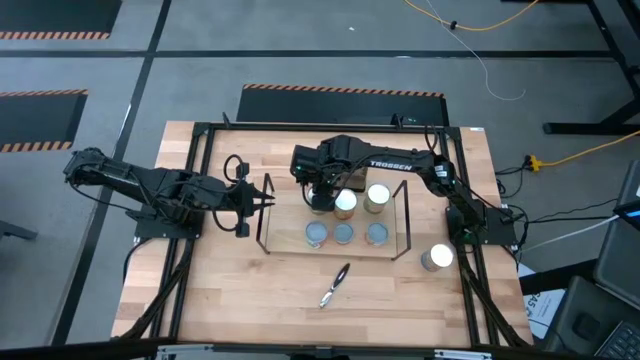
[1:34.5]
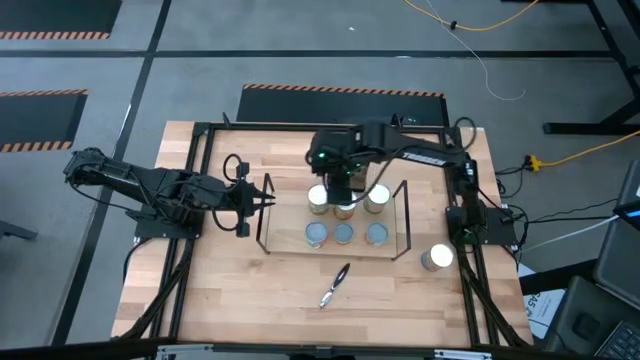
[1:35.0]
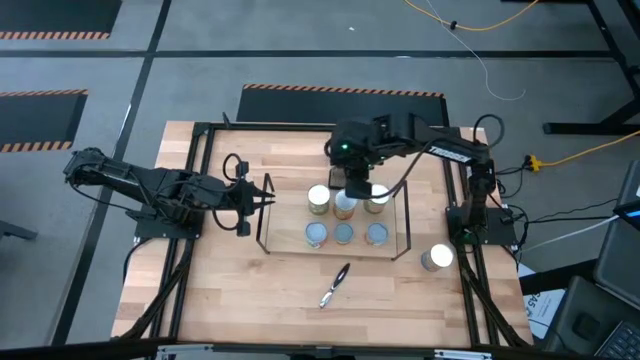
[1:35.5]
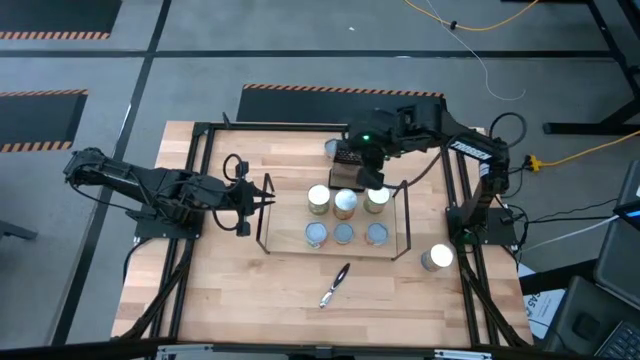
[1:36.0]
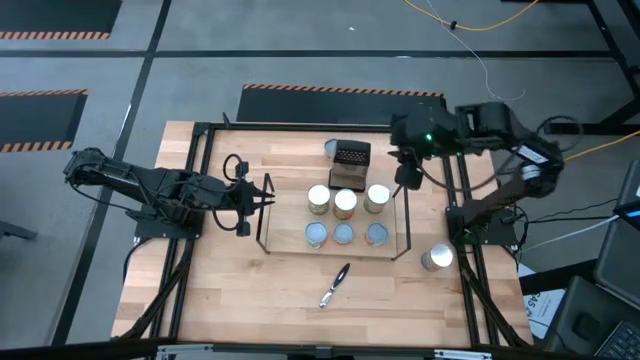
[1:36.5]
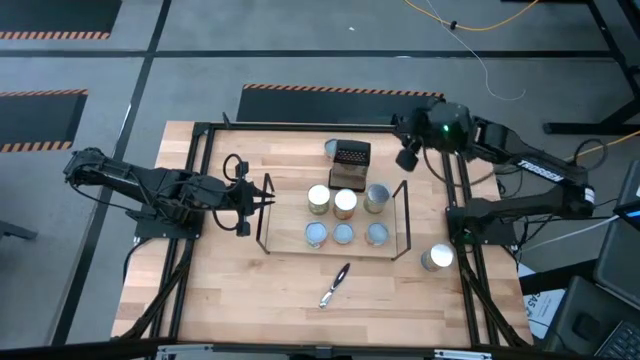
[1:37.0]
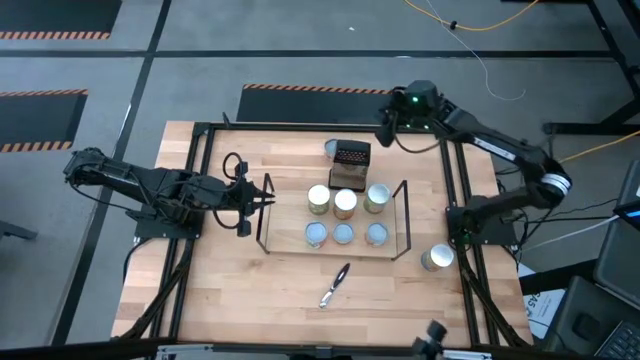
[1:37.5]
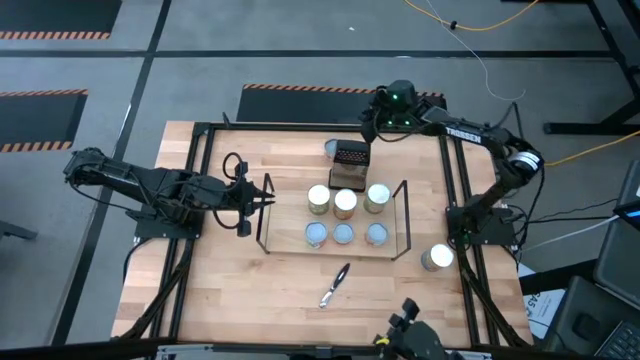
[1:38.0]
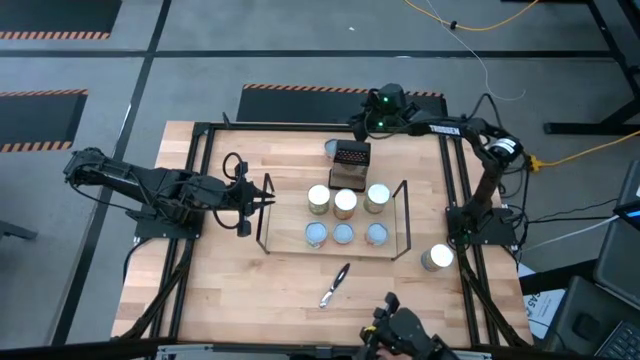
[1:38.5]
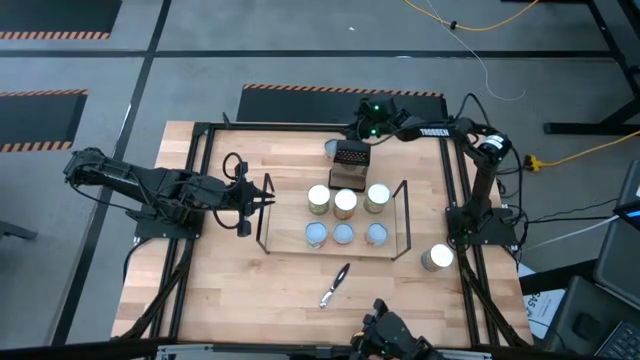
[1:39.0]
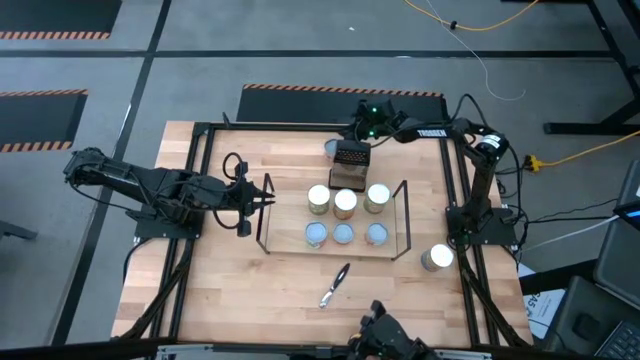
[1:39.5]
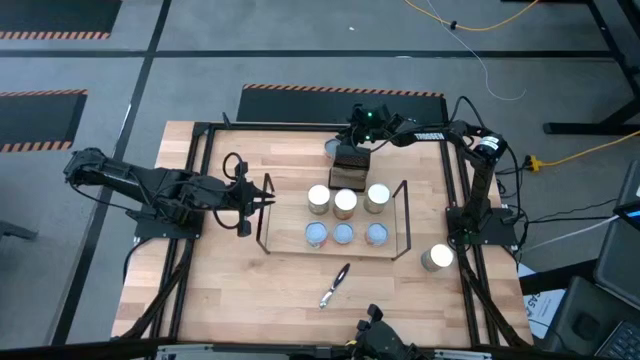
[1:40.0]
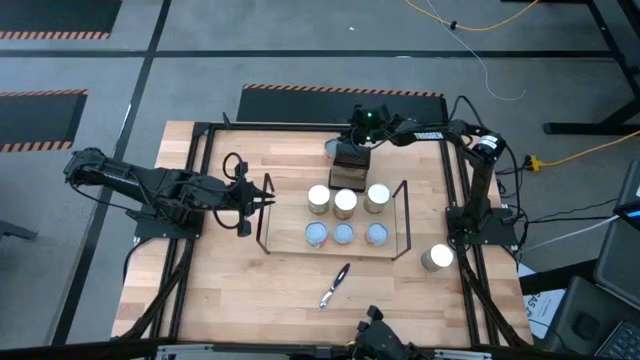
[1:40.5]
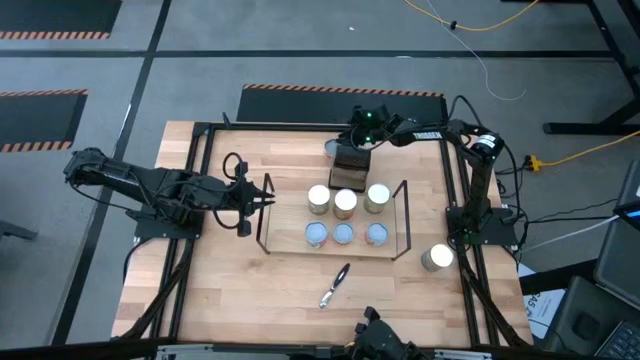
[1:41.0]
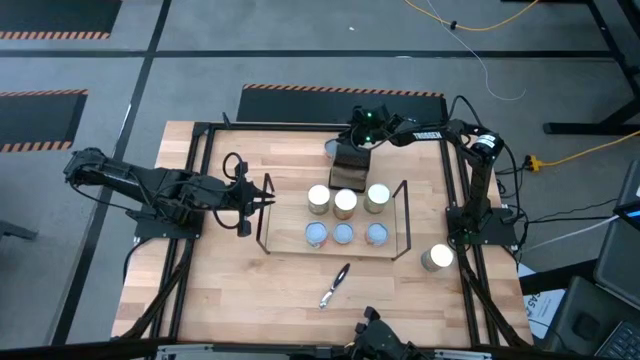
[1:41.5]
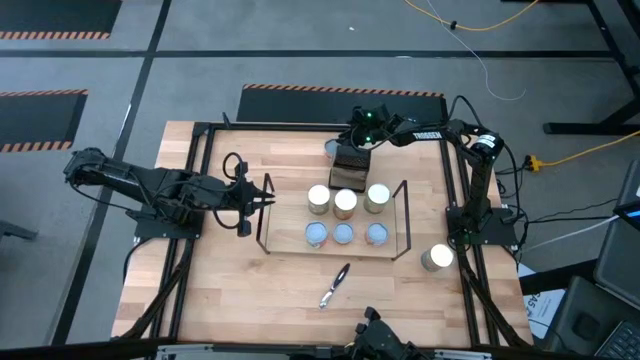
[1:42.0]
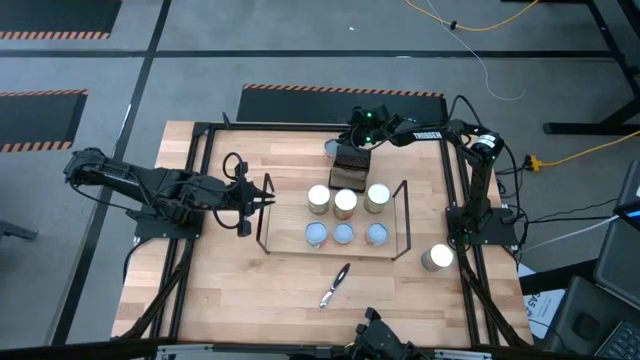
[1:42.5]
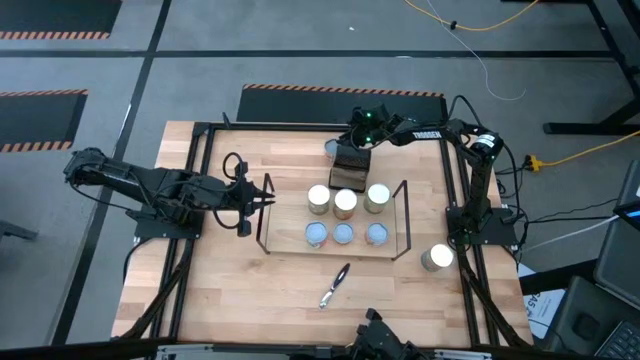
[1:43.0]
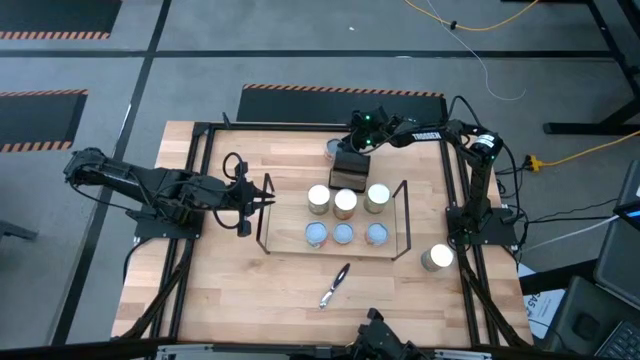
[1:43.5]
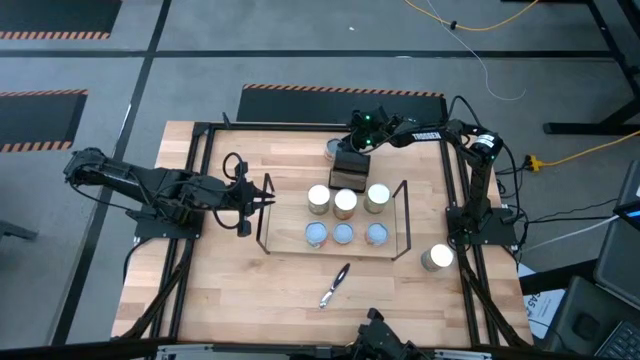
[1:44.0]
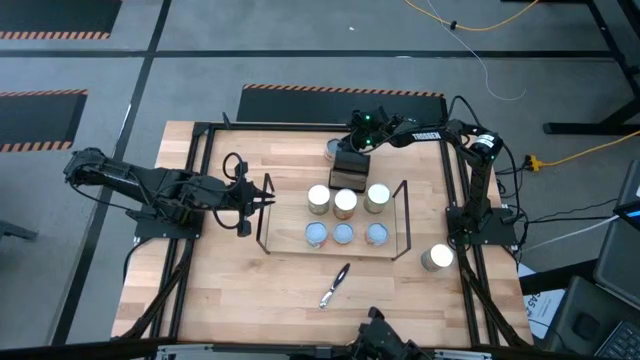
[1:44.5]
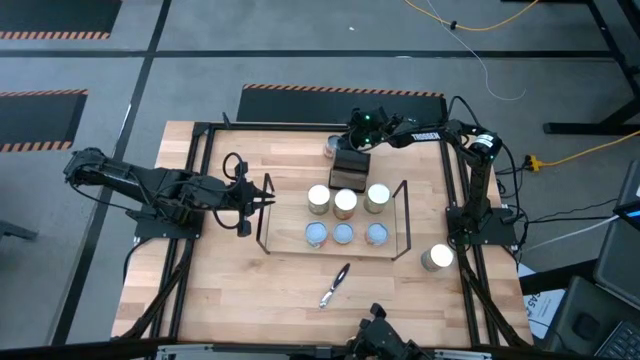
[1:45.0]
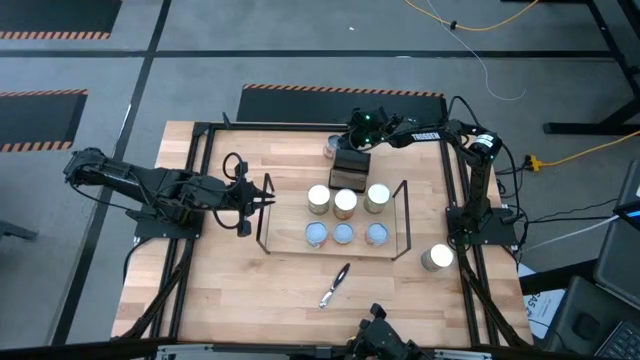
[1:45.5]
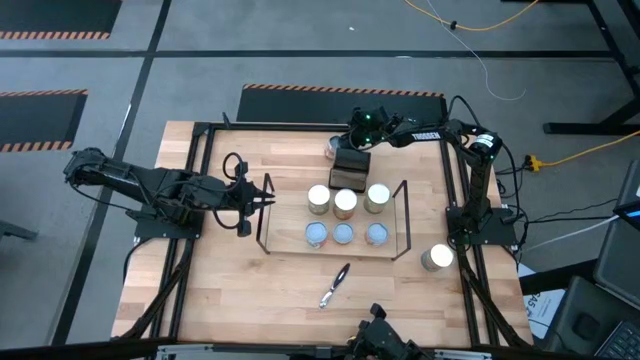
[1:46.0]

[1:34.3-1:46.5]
Task: Pick and place cans onto a shelf
Put the canned diced tomatoes on the shelf

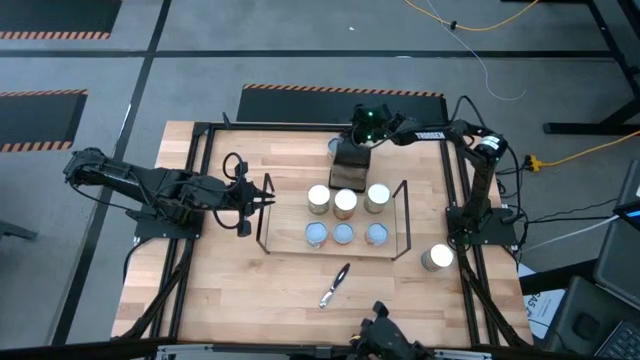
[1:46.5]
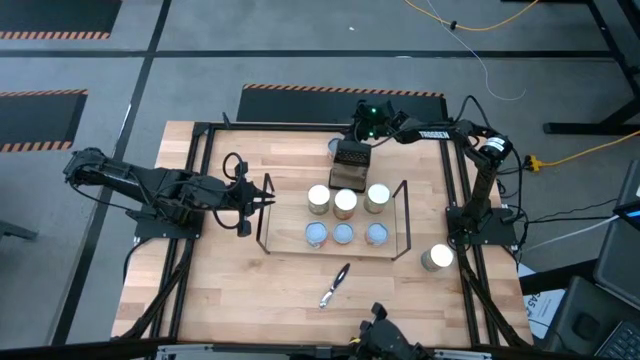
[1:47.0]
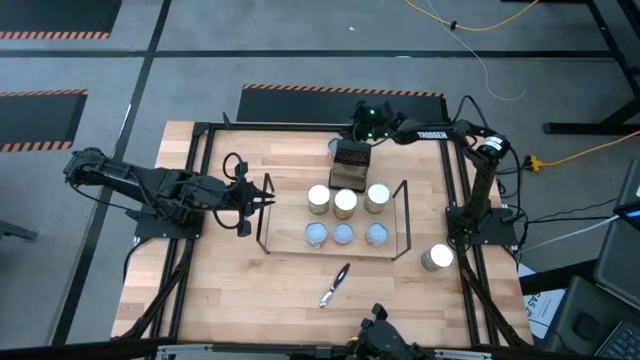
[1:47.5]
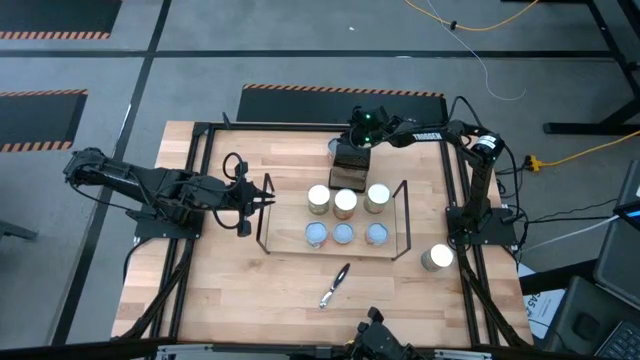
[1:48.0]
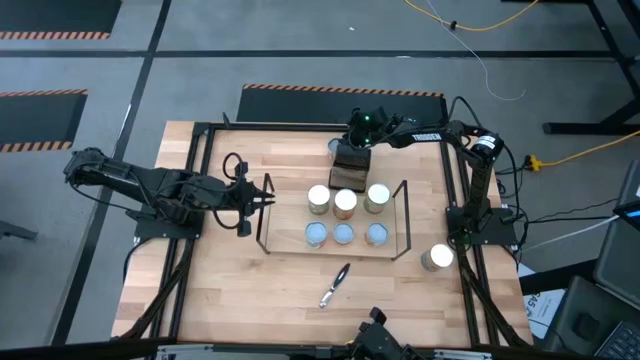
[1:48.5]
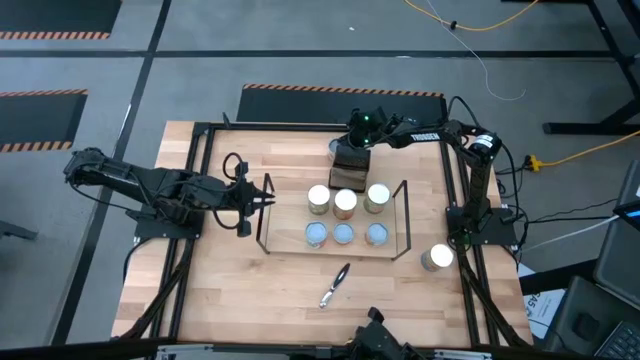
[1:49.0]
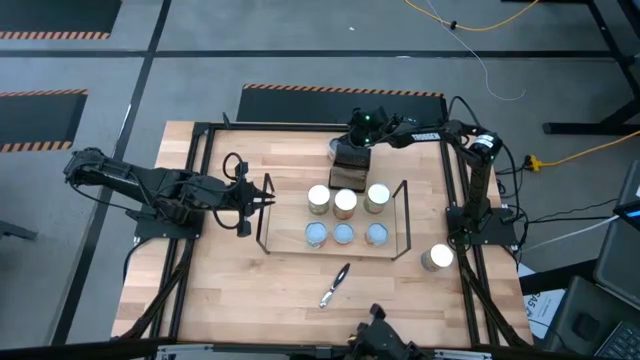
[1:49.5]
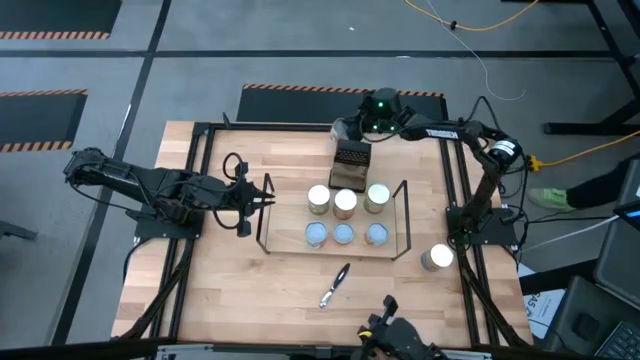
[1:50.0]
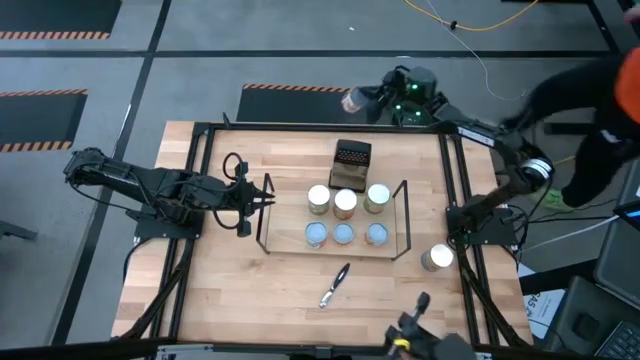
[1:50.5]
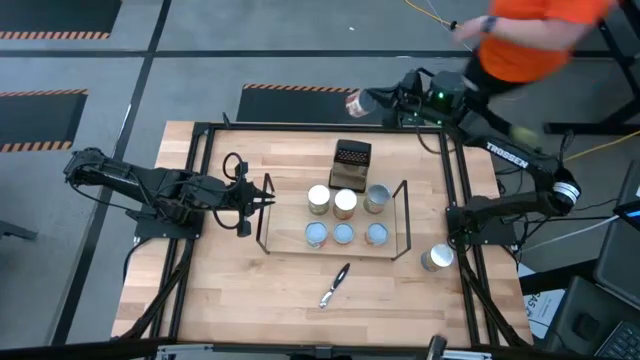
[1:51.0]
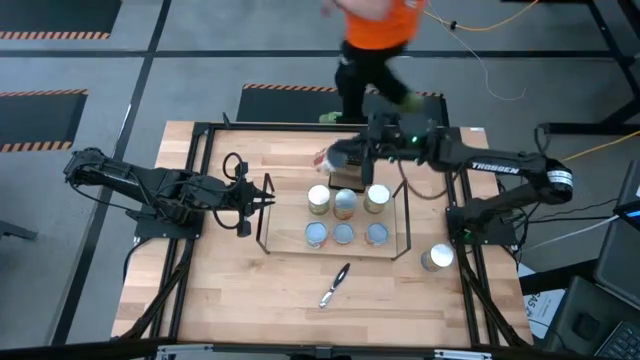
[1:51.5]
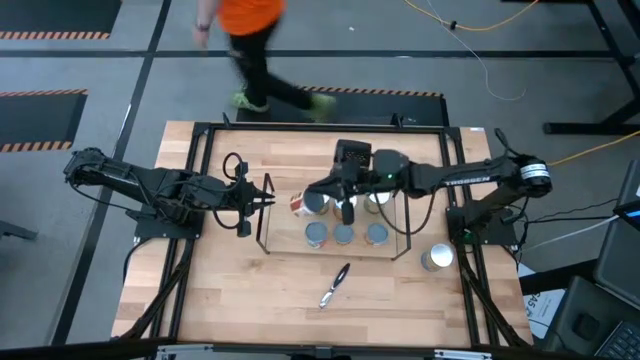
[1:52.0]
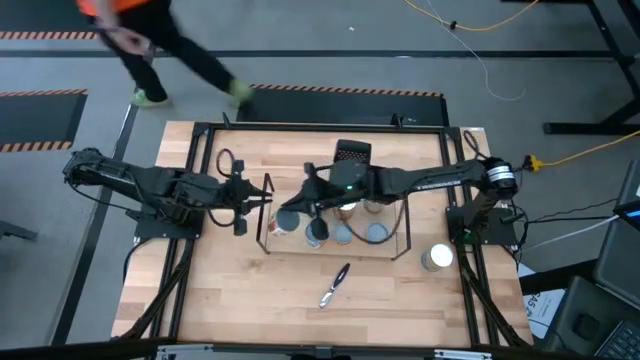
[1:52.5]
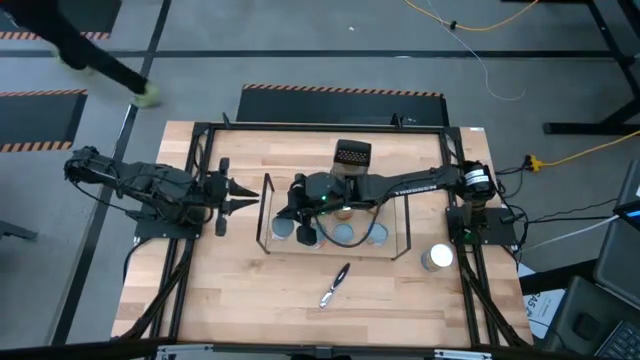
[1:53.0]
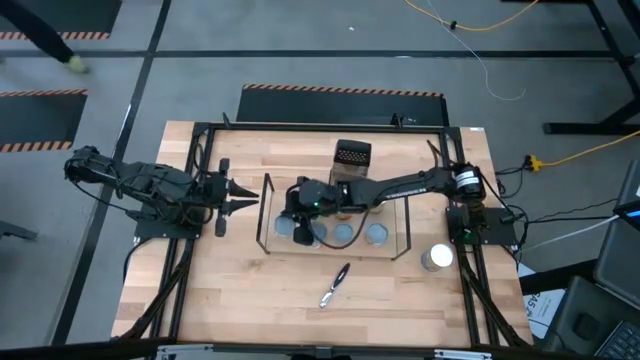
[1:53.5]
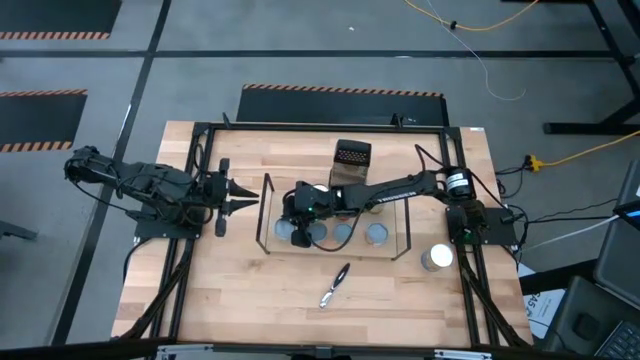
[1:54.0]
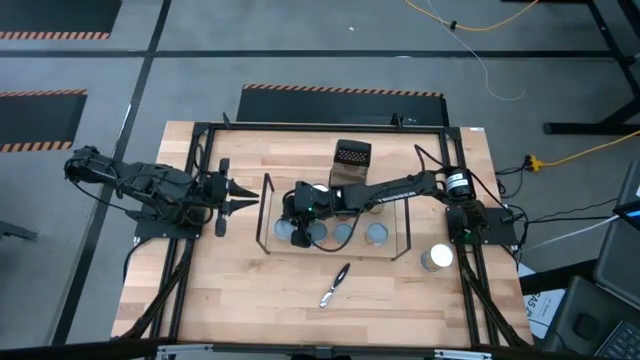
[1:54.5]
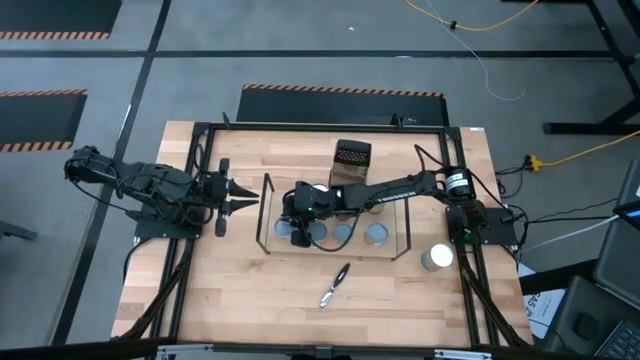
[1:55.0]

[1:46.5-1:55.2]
Put the canned diced tomatoes on the shelf
